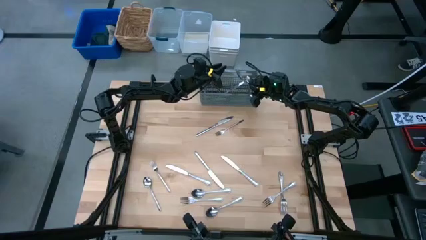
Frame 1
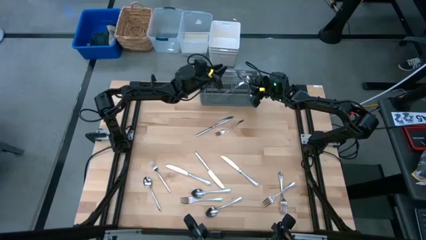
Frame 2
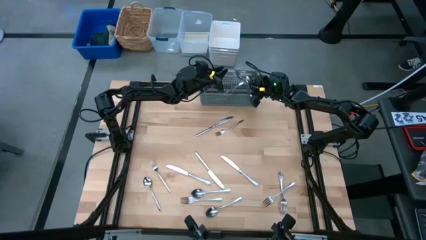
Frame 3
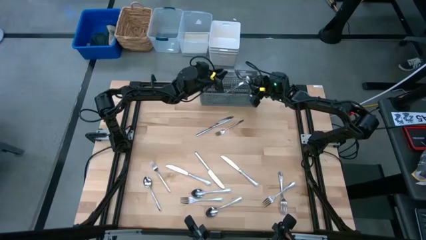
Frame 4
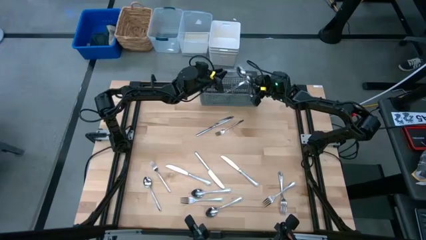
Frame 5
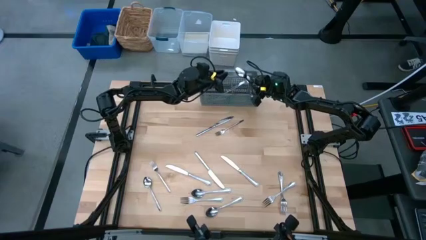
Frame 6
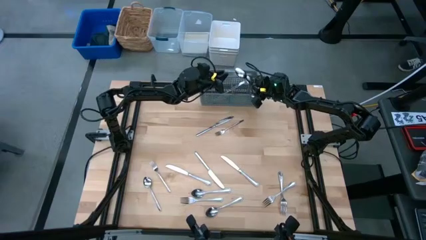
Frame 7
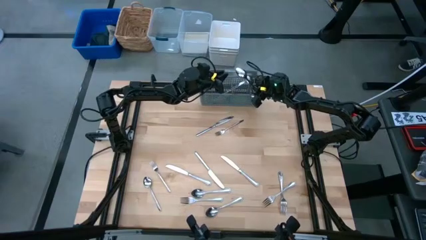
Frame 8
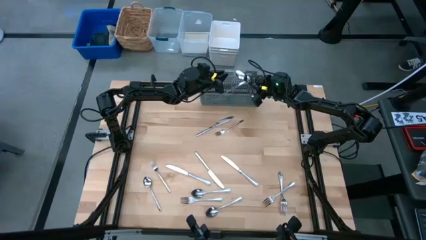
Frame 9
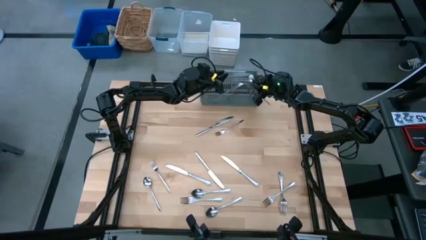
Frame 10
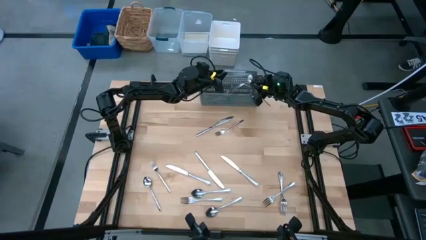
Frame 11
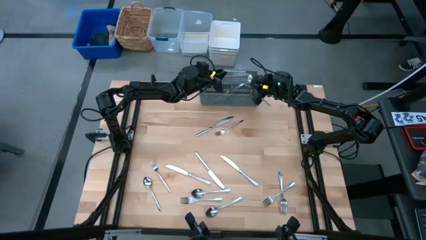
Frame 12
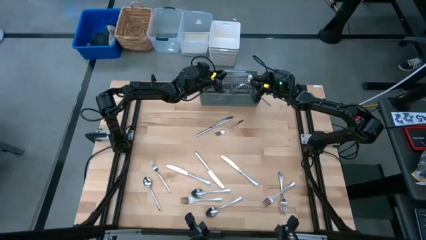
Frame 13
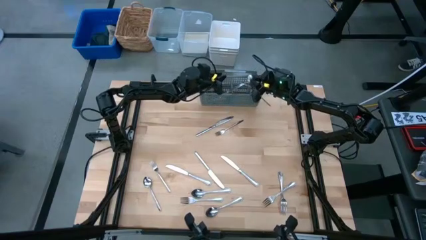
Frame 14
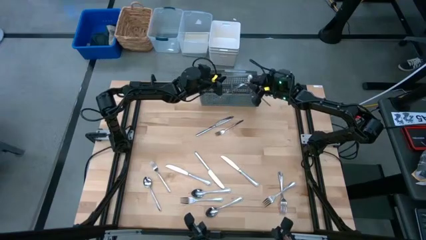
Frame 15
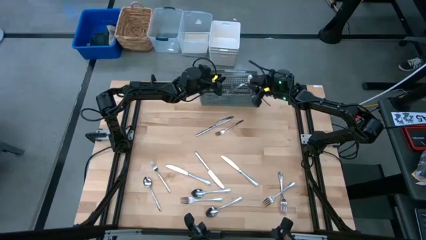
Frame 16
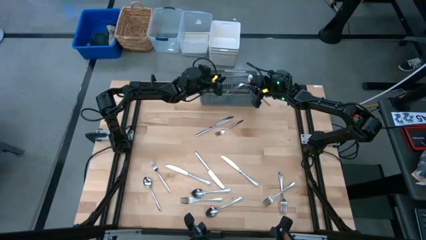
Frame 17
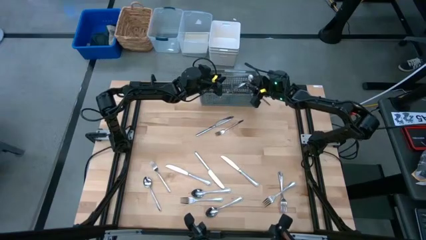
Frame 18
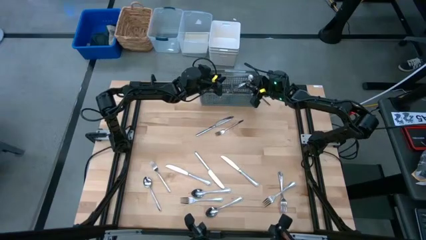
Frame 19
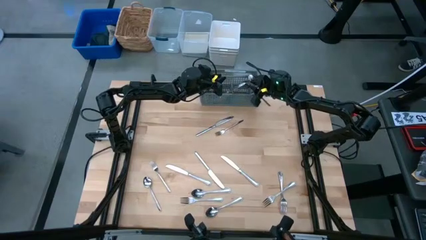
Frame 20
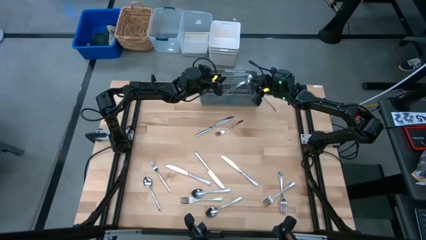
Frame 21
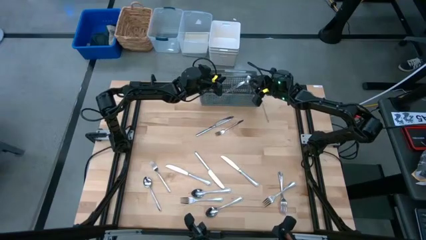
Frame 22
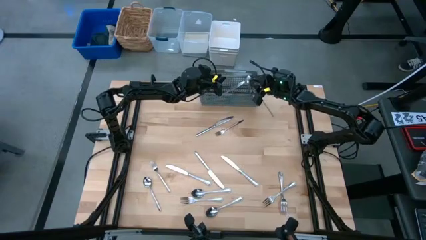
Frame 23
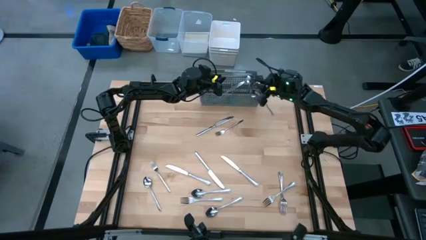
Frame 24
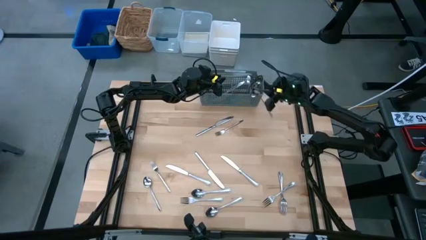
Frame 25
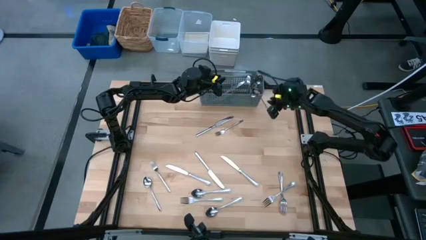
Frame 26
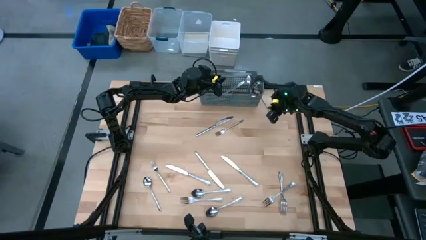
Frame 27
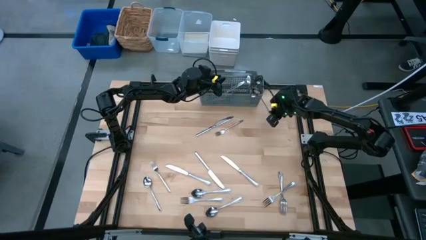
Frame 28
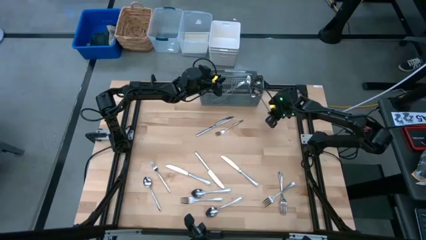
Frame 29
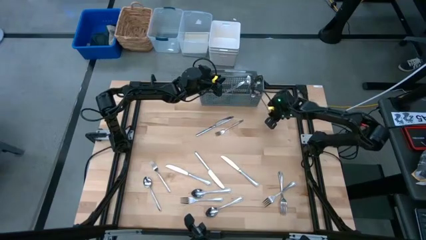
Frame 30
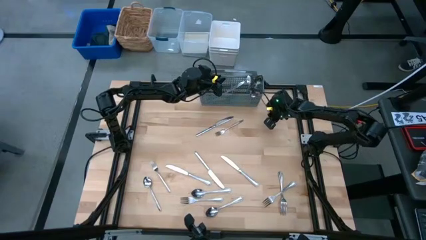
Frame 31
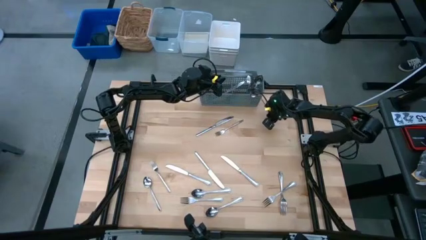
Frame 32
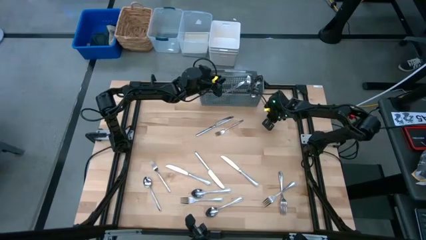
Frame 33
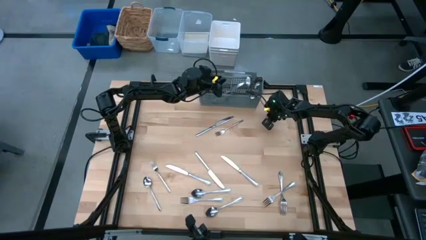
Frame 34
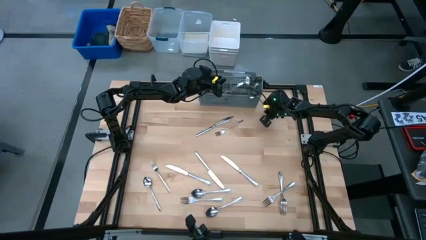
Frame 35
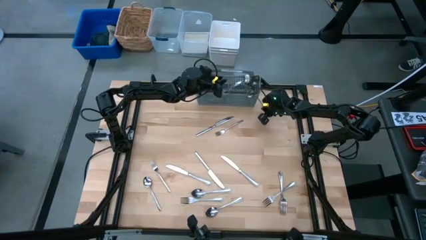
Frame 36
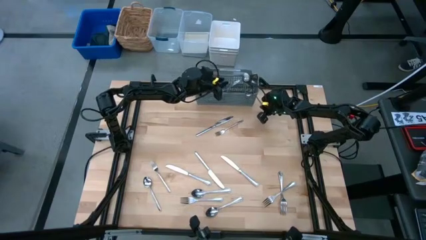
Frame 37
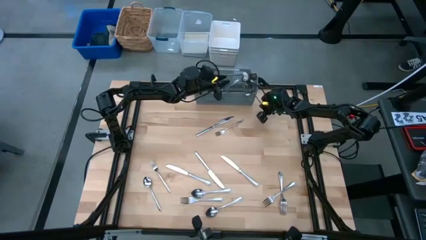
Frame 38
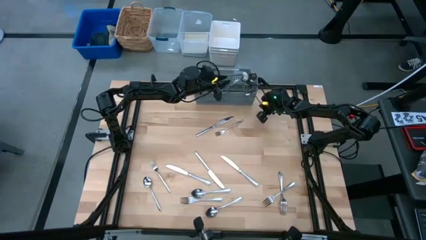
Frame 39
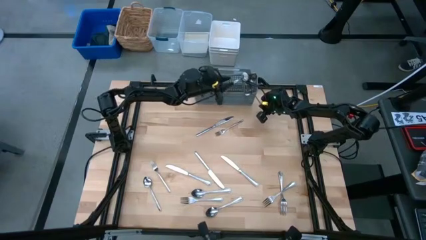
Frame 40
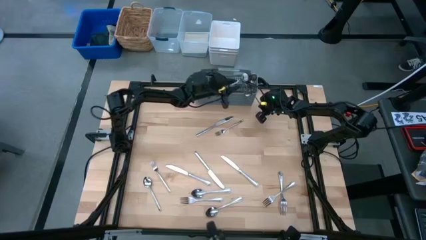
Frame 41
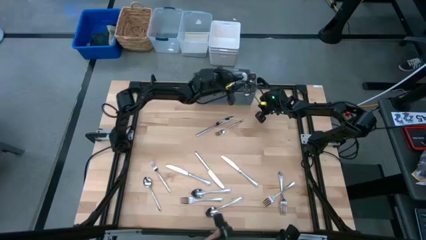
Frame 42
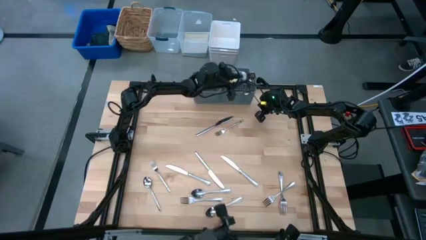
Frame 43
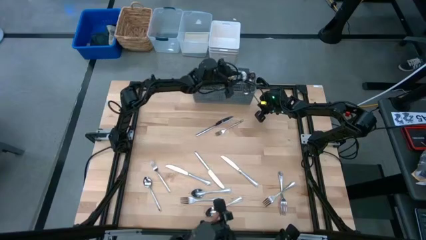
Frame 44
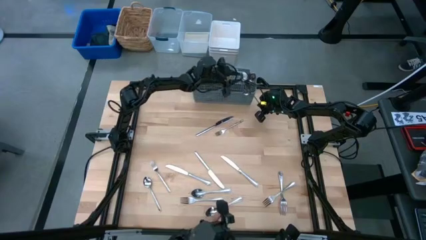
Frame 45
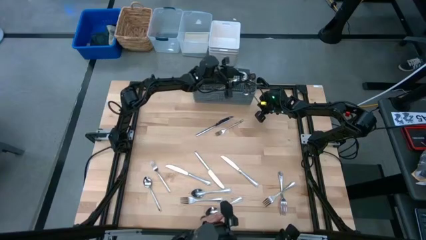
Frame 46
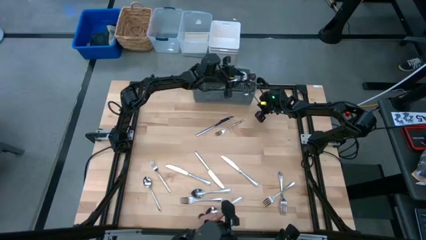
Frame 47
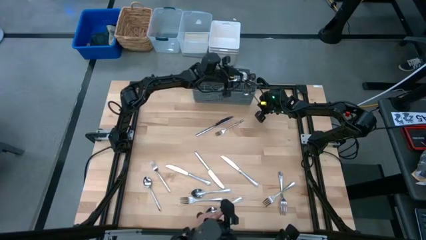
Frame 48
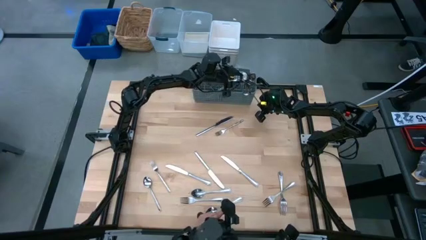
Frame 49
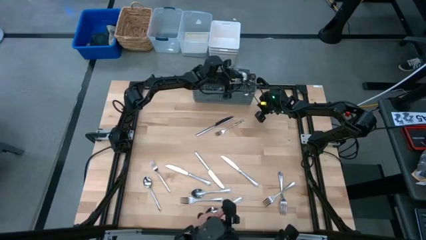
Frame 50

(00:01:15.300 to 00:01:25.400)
Adjust the silver spoon in the dishwasher utensil holder

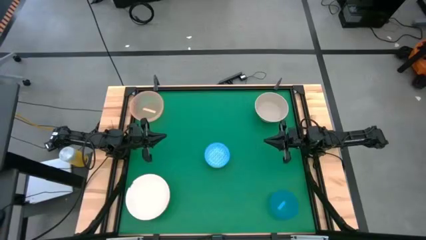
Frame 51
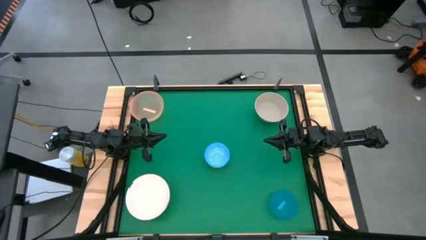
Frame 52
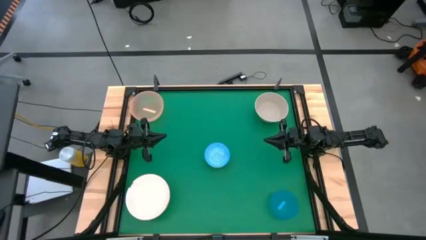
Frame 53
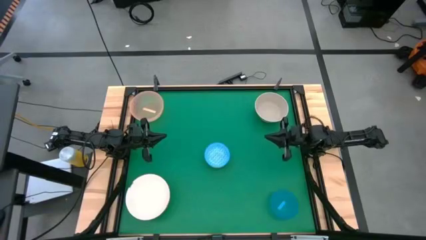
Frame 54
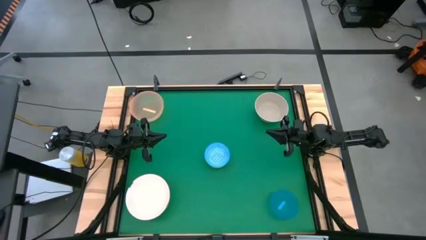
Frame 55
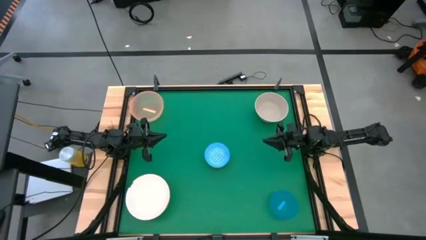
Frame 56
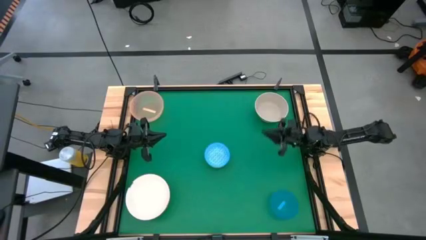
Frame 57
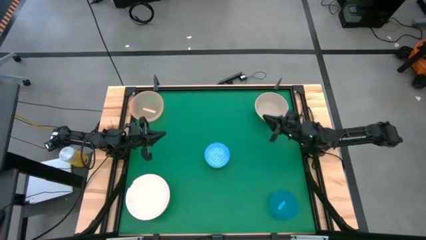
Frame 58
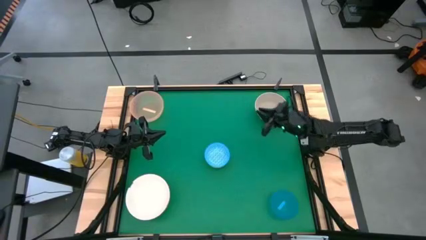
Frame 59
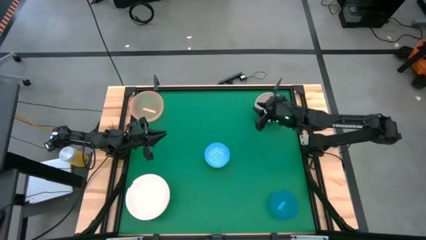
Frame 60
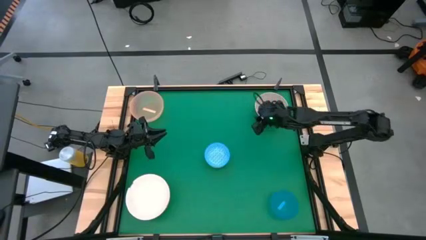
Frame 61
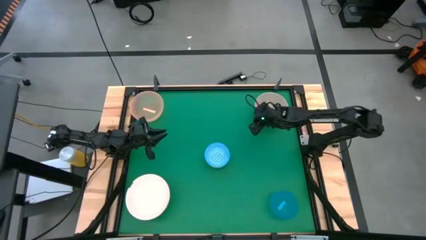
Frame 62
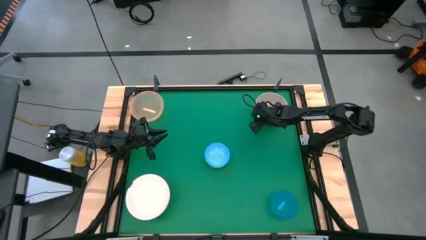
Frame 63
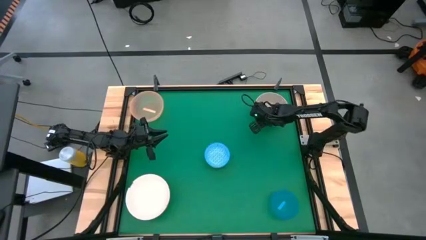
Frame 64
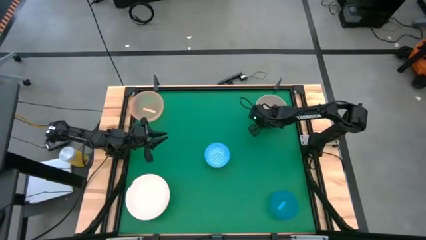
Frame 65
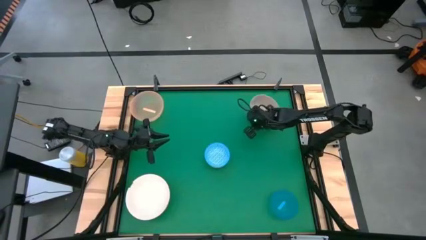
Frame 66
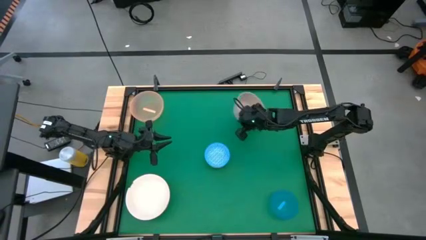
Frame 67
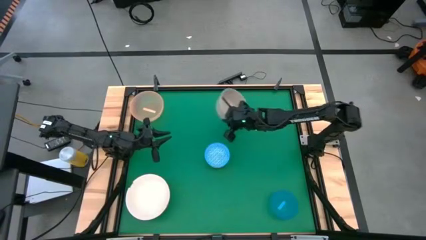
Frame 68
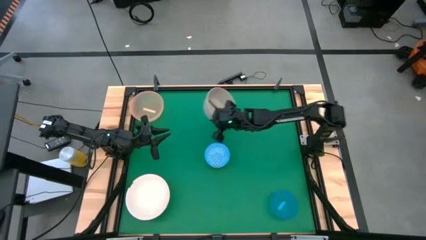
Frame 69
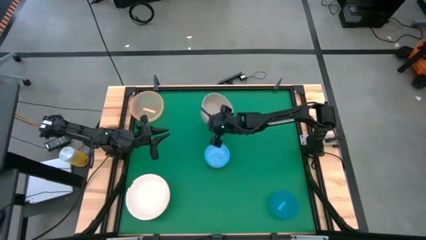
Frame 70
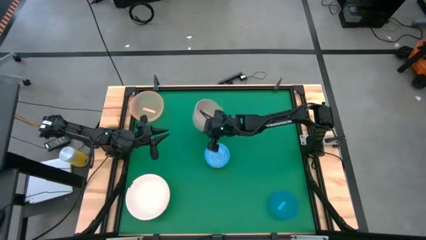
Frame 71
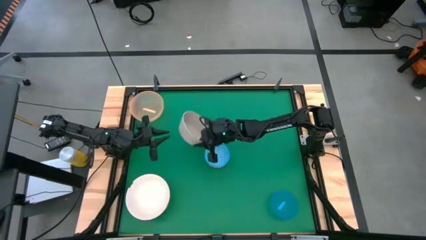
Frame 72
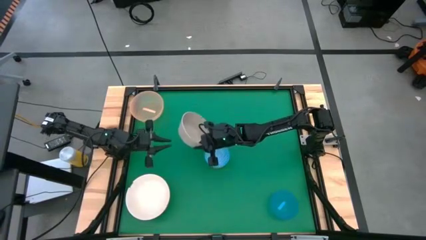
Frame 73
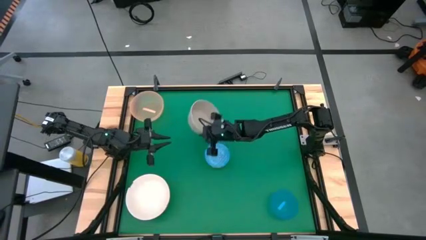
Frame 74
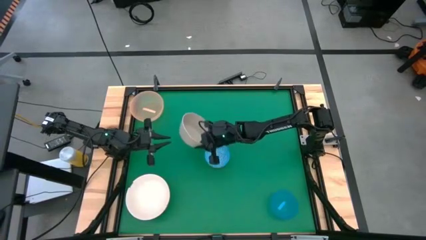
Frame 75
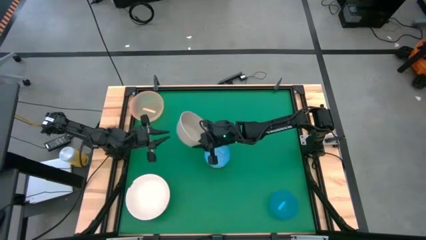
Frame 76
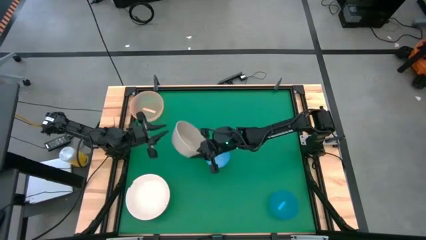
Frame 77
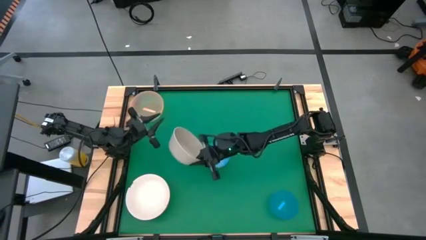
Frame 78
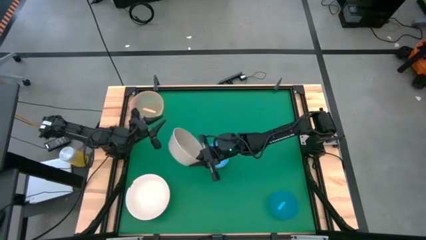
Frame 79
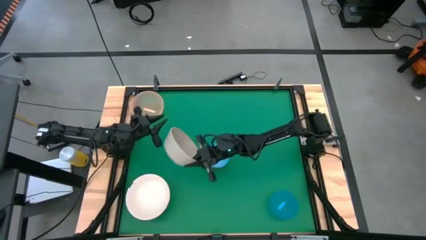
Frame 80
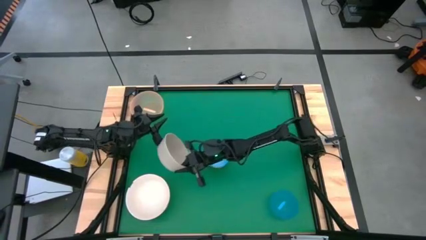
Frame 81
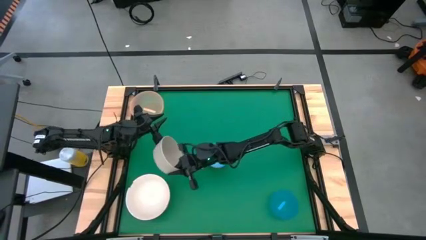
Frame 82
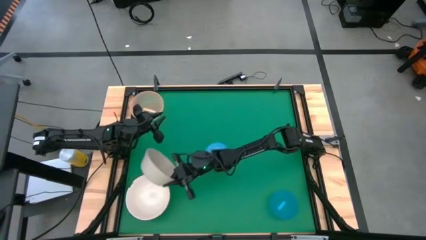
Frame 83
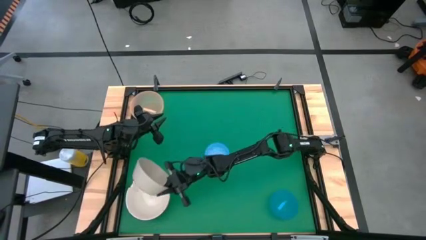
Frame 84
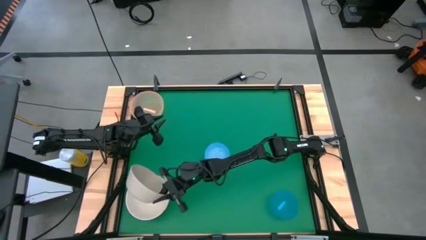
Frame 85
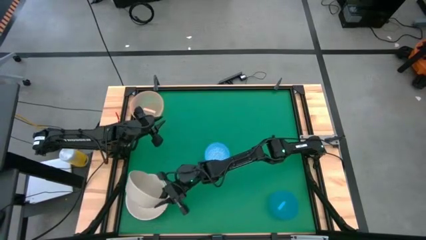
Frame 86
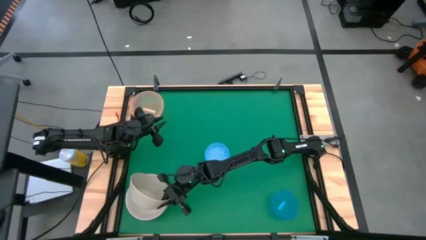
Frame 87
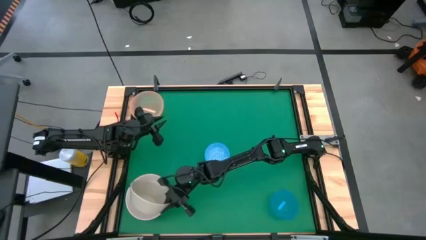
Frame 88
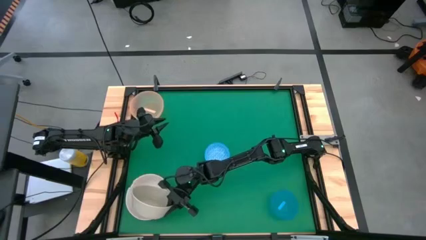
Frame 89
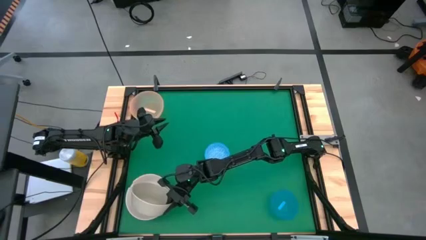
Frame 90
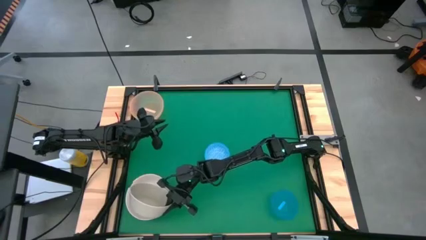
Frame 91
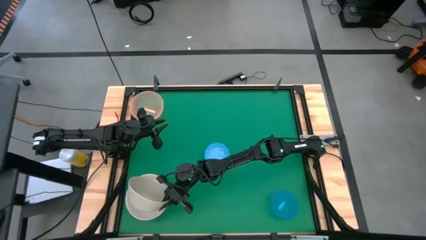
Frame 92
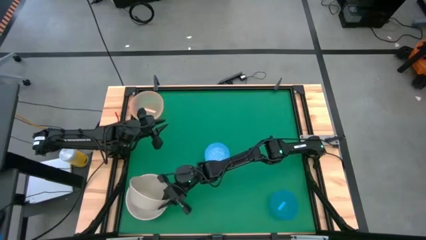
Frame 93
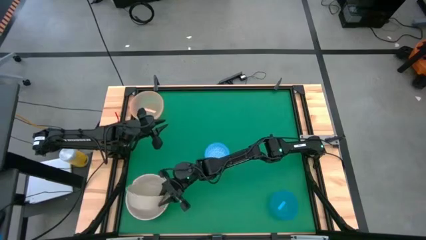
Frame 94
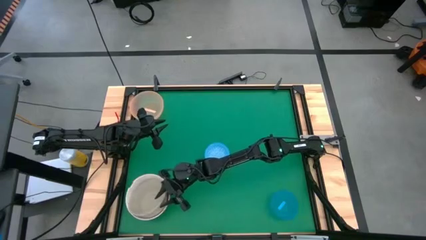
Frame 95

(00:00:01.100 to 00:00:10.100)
Stack the gray bowl on top of the white bowl
